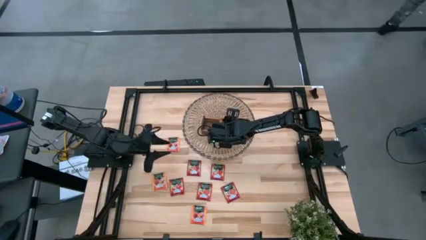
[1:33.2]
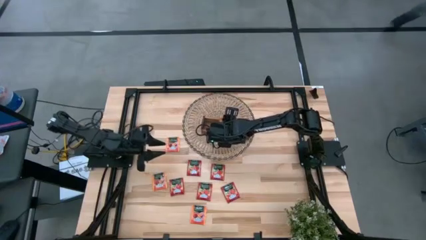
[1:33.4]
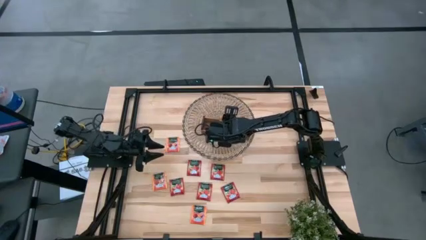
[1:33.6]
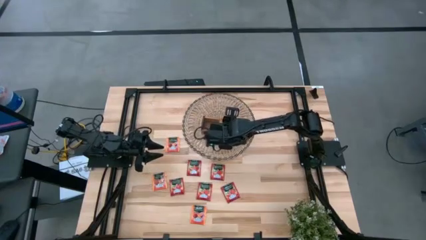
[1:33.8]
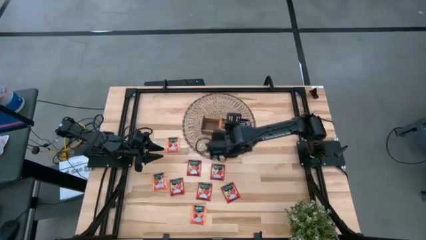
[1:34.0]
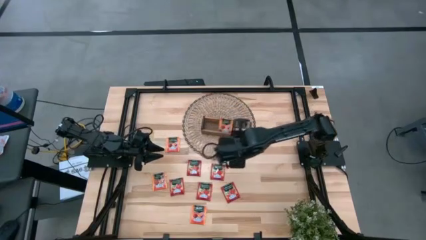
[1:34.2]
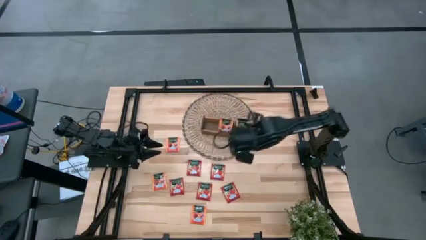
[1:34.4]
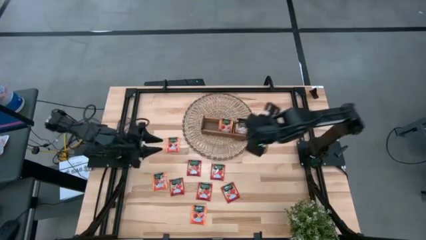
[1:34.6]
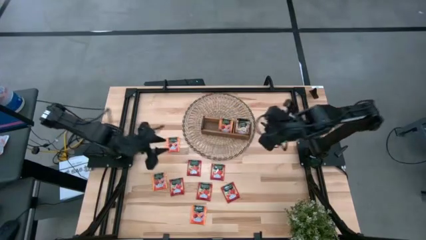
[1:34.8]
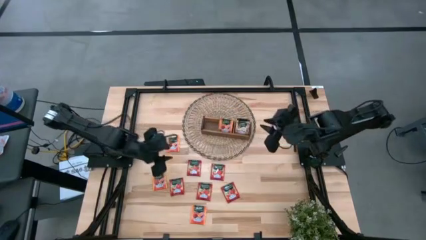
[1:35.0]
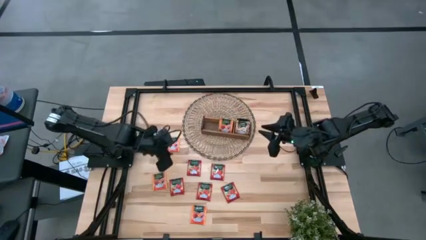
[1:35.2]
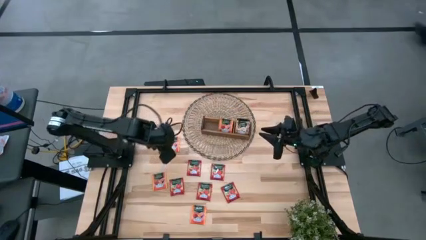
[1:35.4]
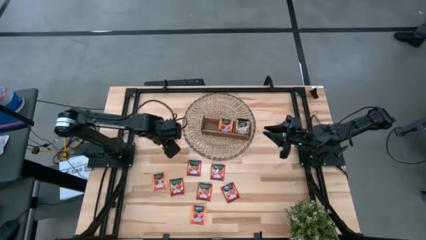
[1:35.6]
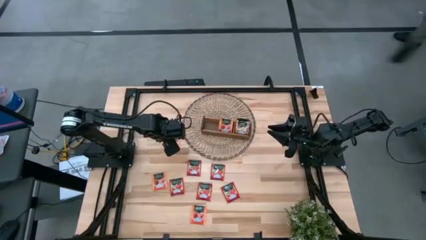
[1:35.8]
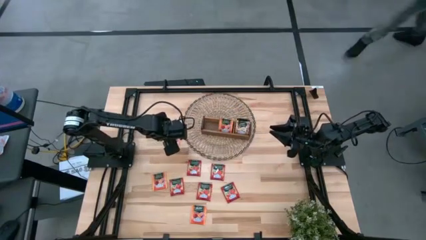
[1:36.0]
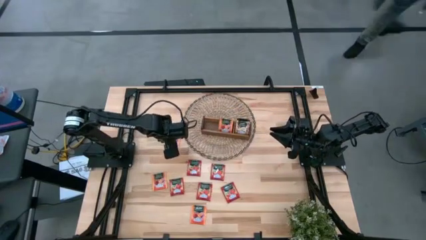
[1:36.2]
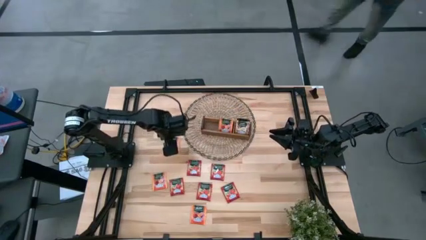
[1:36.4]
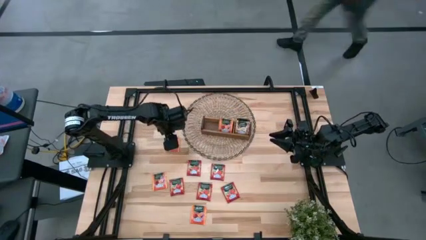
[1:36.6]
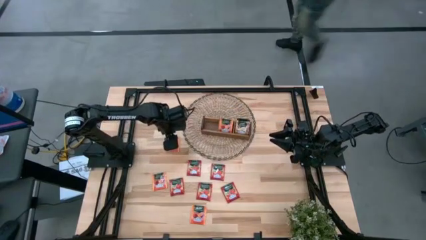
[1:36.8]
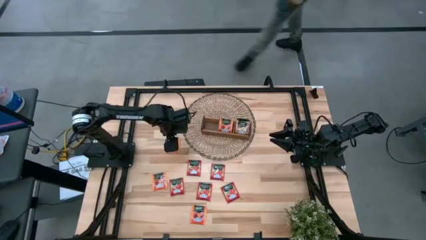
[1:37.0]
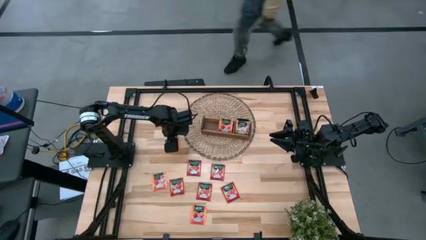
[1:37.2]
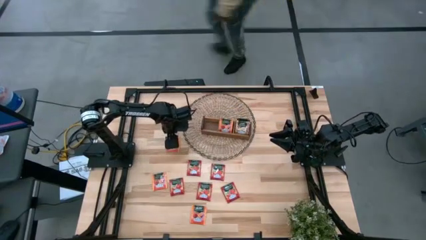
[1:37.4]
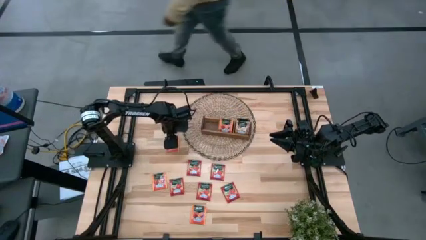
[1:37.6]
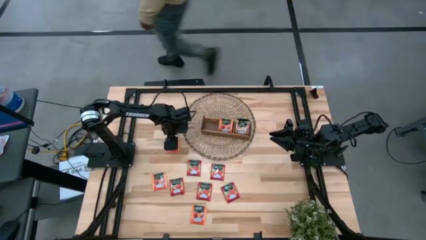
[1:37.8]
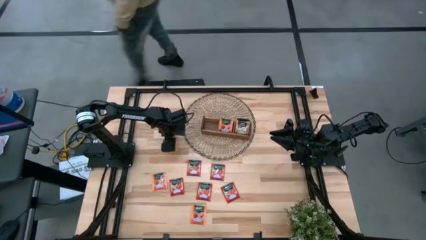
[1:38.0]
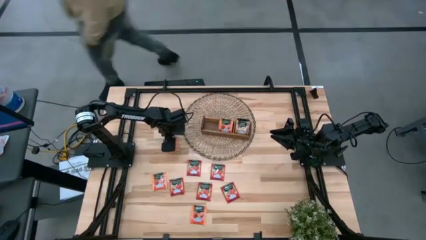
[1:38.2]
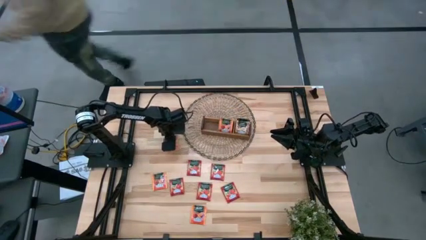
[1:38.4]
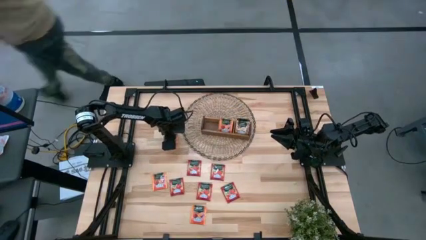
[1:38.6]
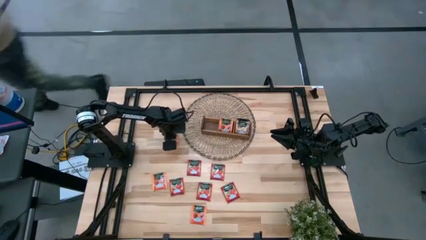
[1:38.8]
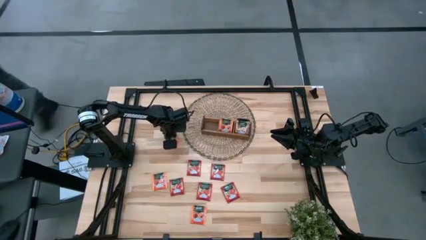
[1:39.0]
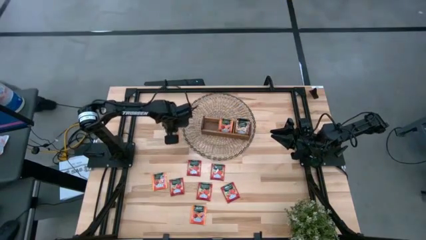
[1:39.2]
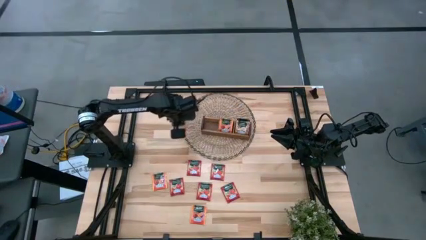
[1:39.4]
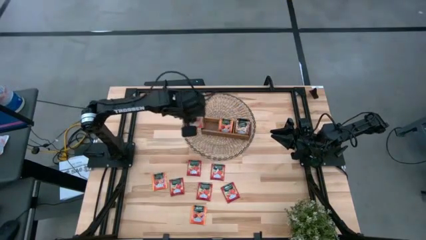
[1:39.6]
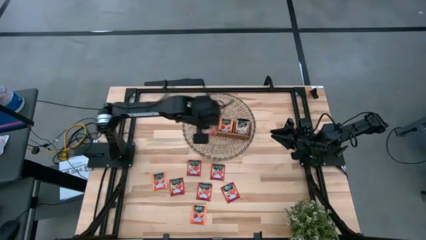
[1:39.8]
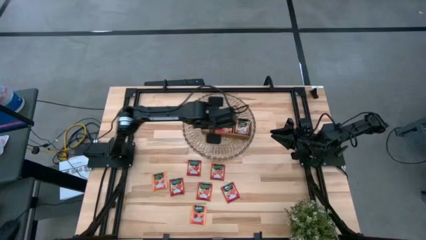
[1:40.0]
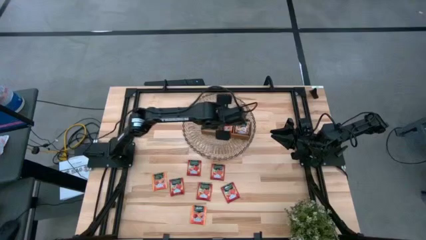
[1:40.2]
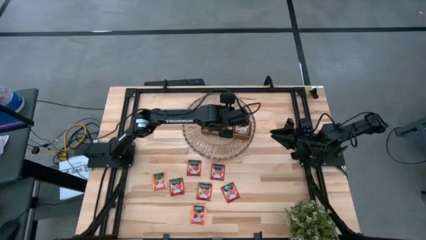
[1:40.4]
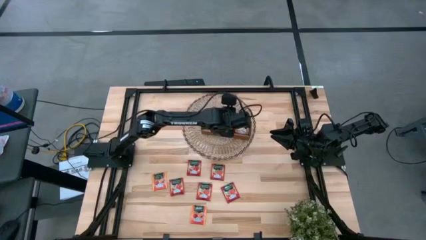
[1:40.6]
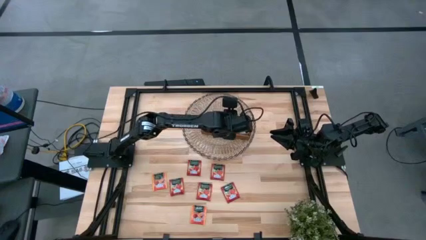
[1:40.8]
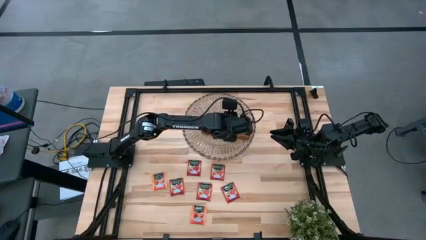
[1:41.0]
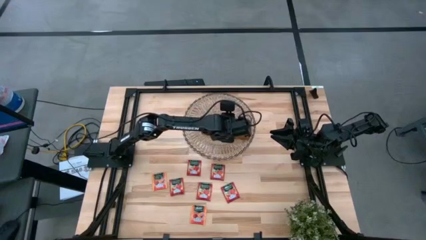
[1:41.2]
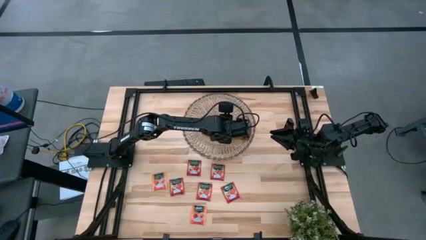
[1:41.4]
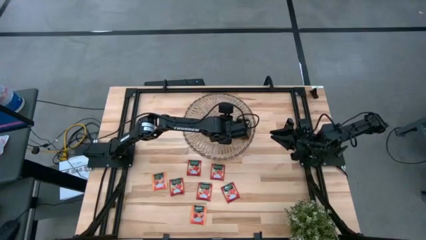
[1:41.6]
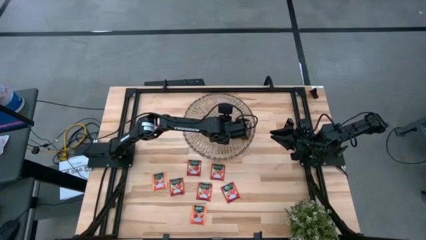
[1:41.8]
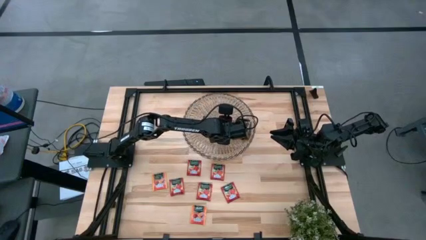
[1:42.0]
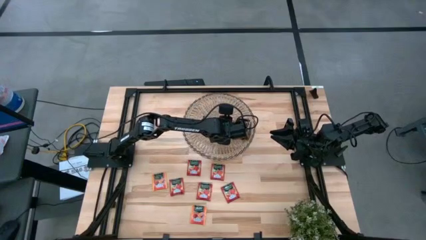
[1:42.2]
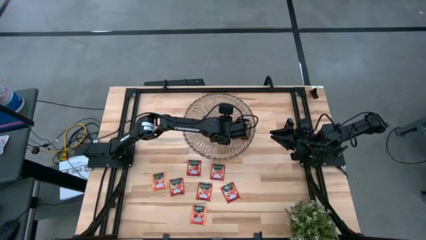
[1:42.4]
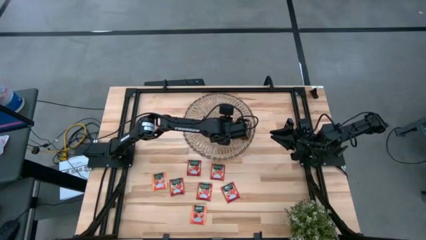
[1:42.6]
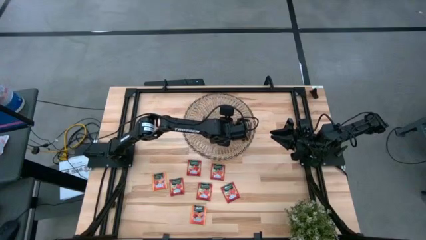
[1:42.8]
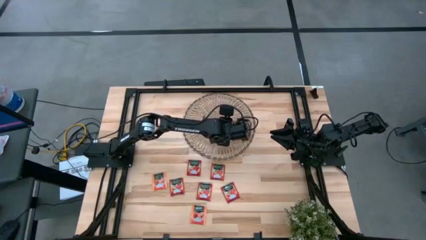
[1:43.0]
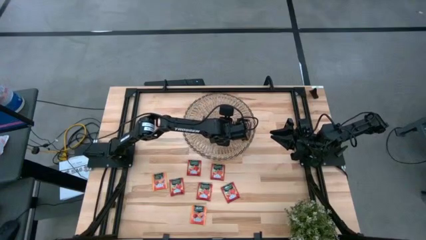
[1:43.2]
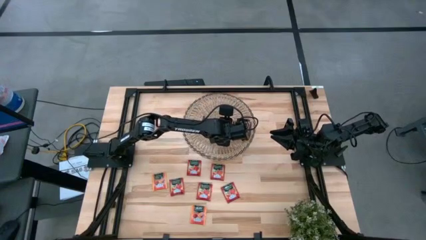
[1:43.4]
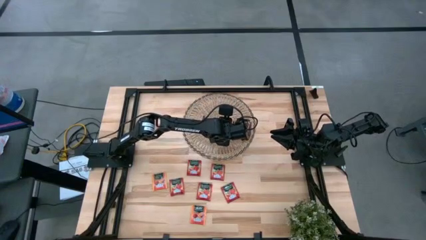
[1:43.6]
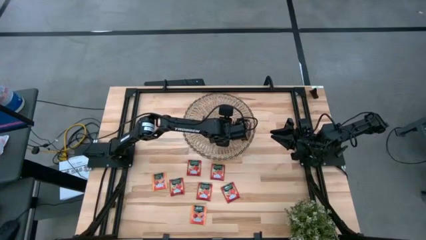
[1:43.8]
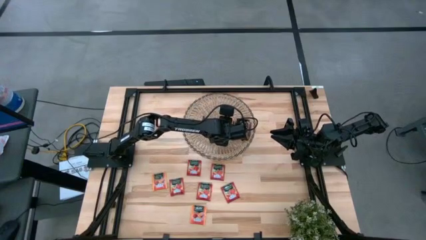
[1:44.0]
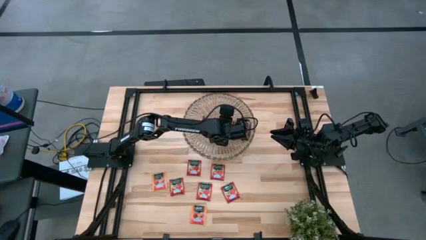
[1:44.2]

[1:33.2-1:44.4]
Task: Pick & Place Tea
Put the top left orange tea bag into the middle slot of the wooden organizer
